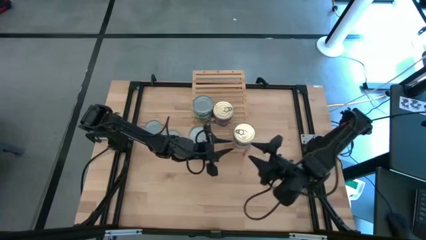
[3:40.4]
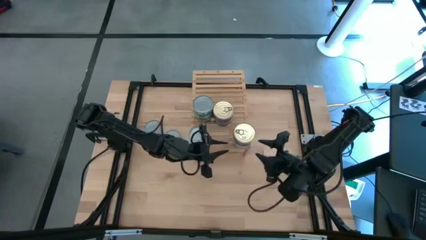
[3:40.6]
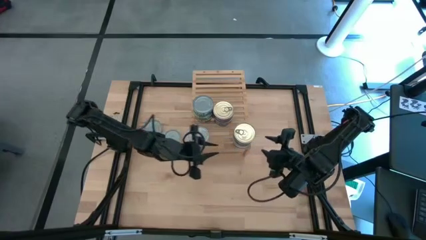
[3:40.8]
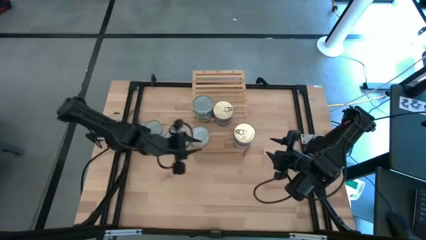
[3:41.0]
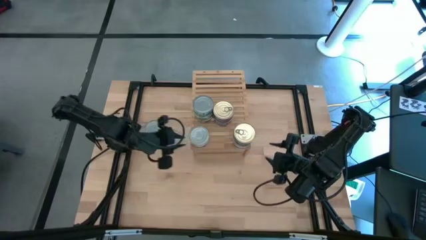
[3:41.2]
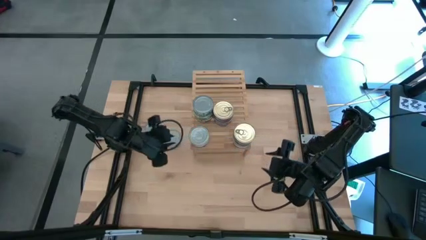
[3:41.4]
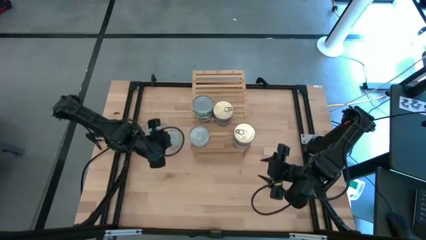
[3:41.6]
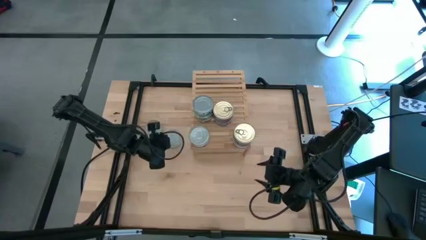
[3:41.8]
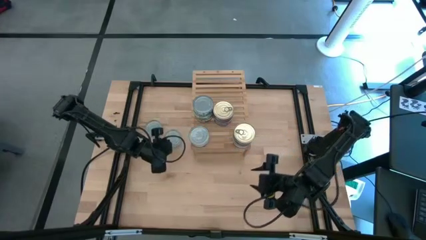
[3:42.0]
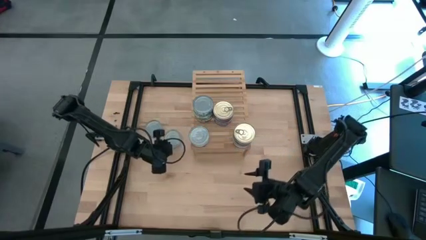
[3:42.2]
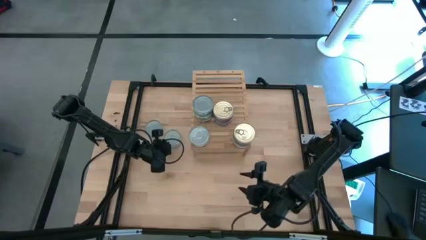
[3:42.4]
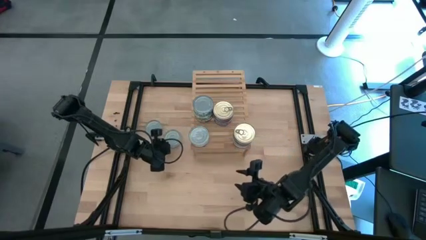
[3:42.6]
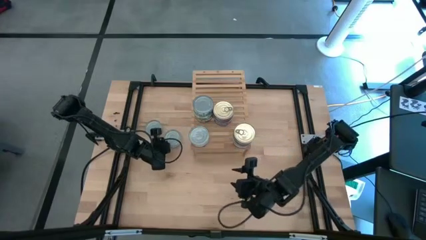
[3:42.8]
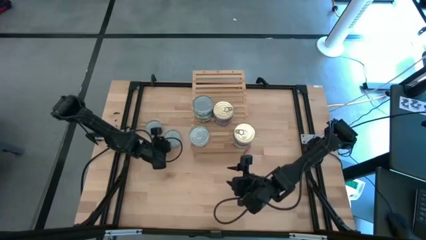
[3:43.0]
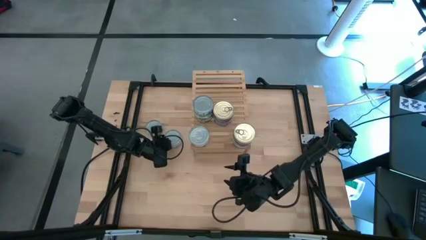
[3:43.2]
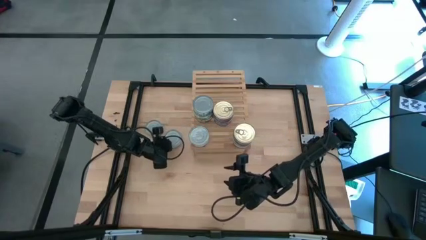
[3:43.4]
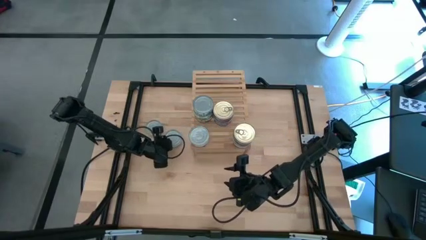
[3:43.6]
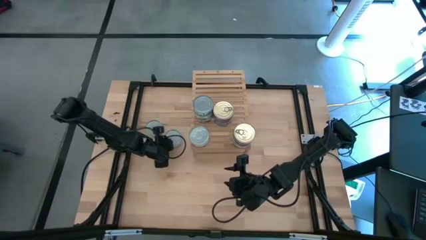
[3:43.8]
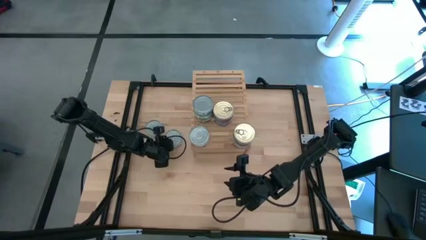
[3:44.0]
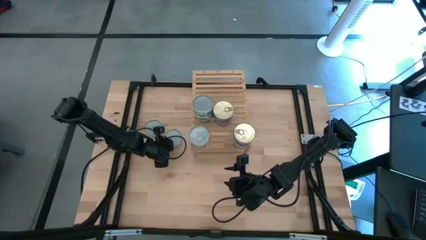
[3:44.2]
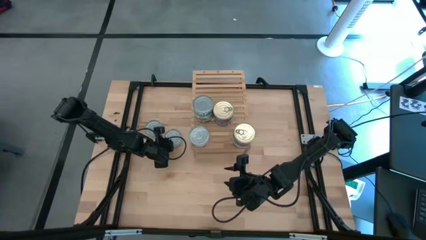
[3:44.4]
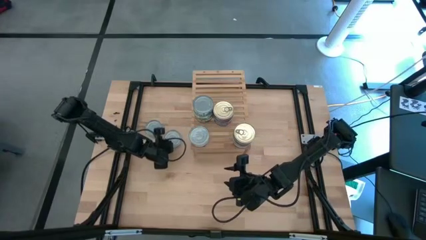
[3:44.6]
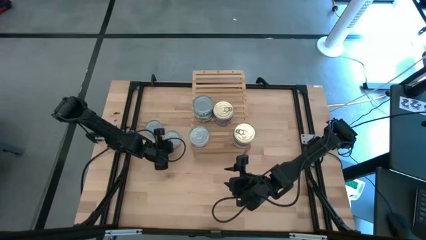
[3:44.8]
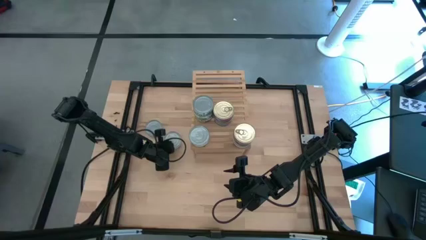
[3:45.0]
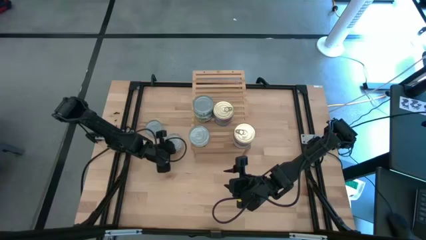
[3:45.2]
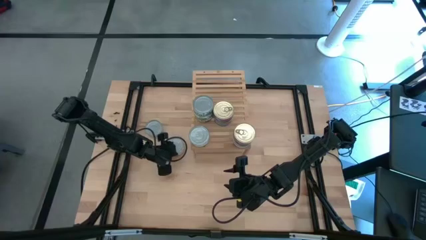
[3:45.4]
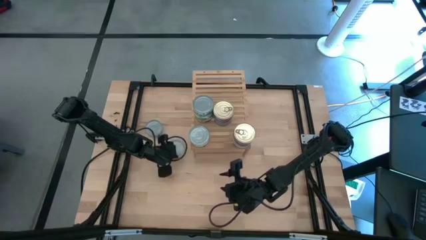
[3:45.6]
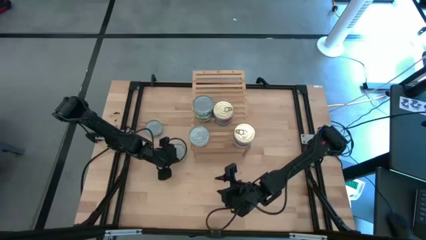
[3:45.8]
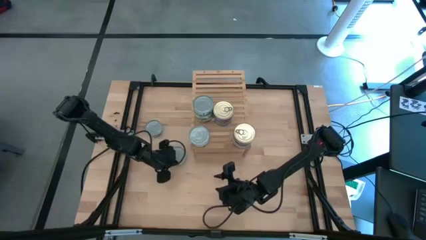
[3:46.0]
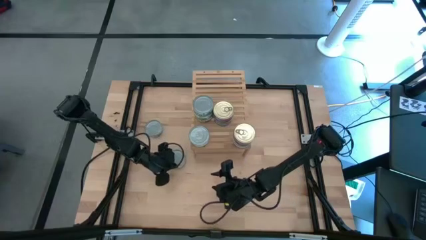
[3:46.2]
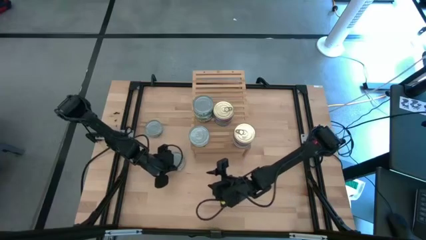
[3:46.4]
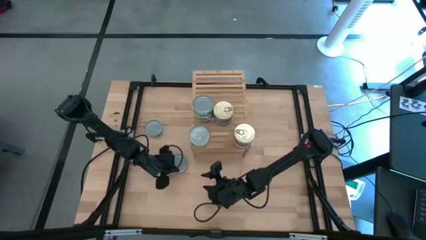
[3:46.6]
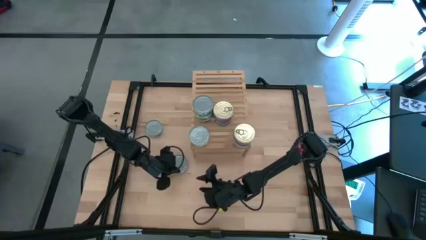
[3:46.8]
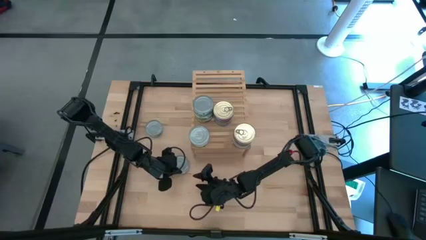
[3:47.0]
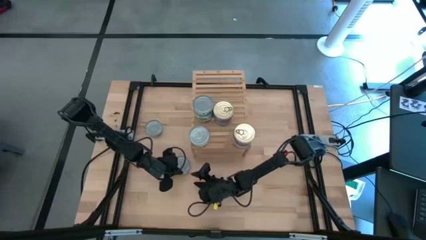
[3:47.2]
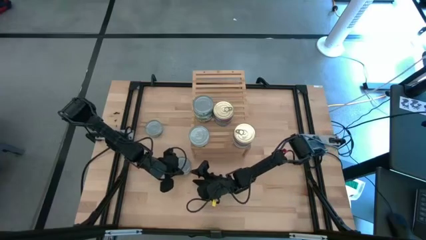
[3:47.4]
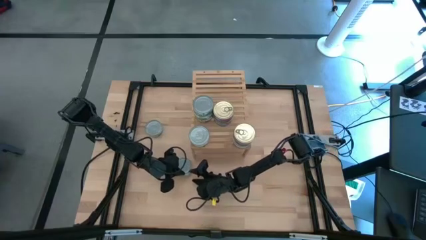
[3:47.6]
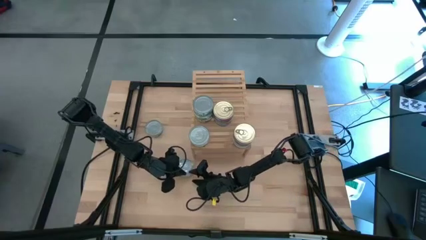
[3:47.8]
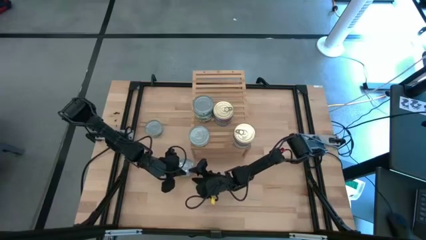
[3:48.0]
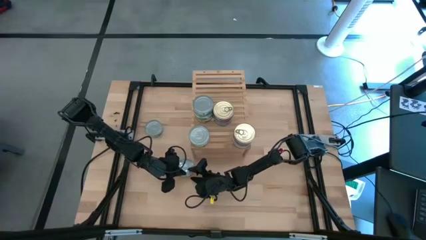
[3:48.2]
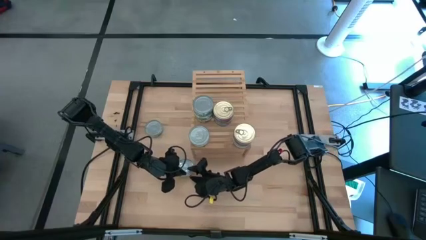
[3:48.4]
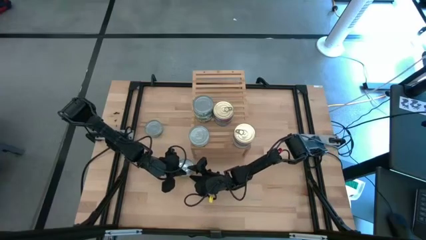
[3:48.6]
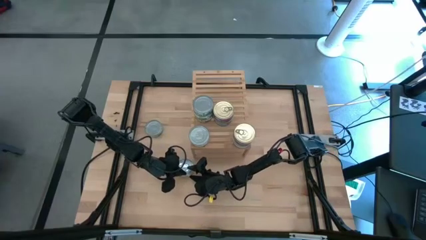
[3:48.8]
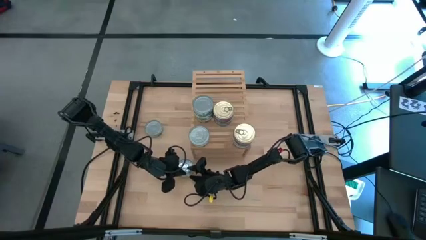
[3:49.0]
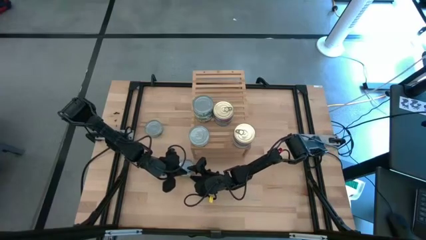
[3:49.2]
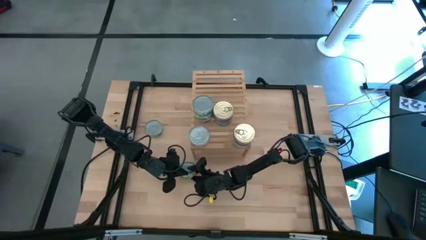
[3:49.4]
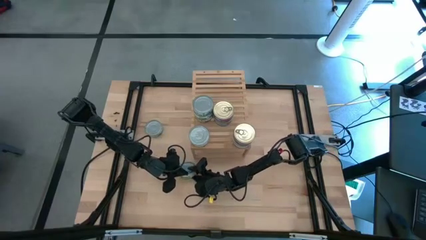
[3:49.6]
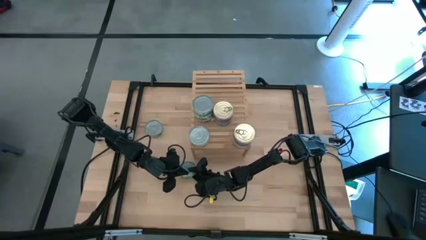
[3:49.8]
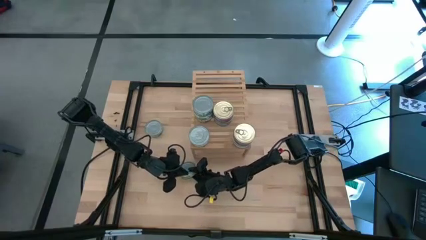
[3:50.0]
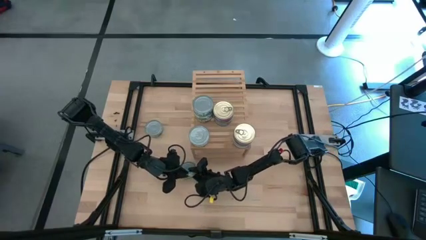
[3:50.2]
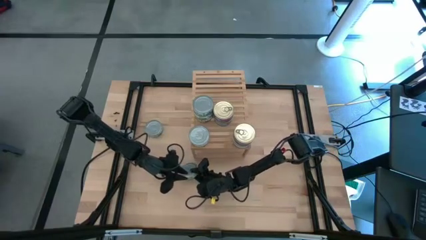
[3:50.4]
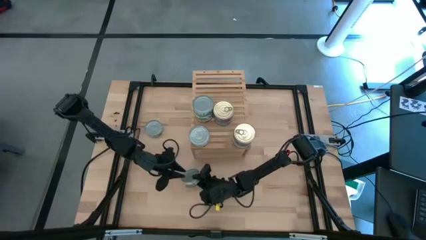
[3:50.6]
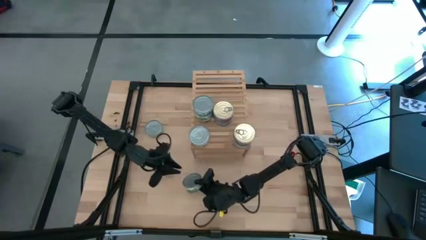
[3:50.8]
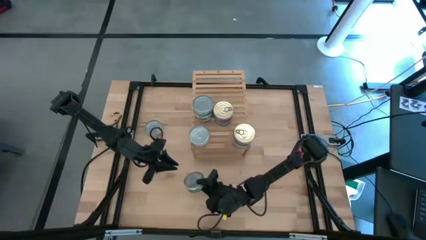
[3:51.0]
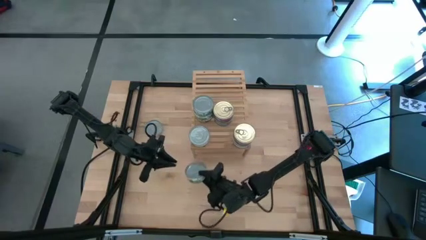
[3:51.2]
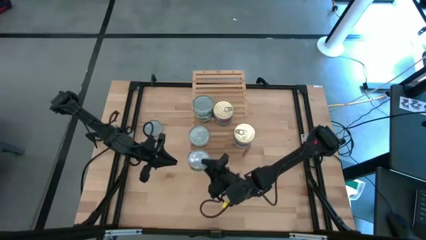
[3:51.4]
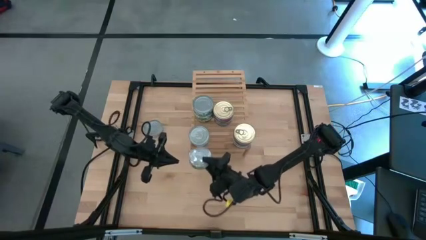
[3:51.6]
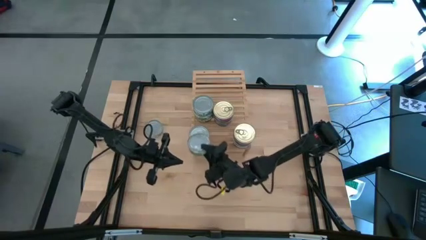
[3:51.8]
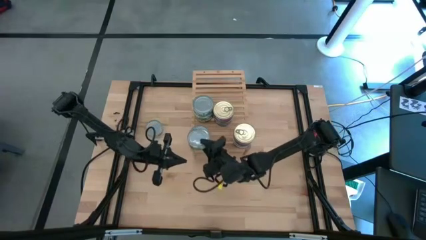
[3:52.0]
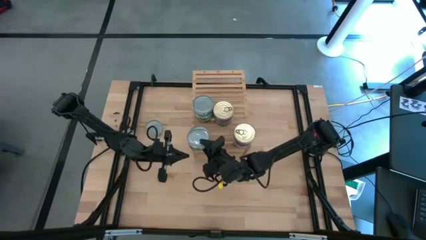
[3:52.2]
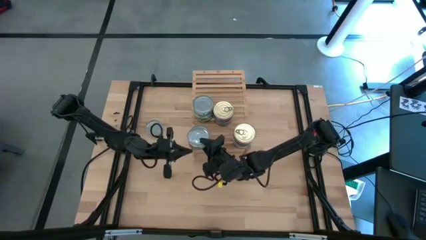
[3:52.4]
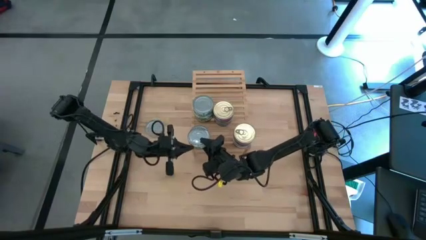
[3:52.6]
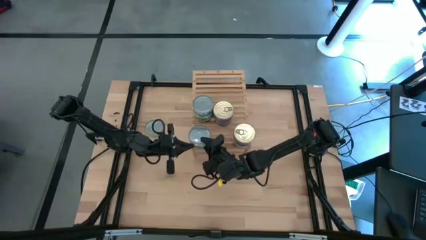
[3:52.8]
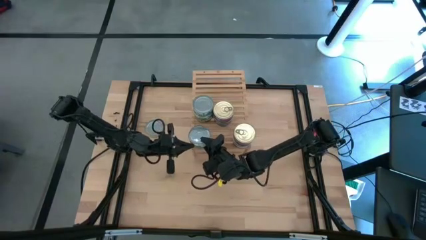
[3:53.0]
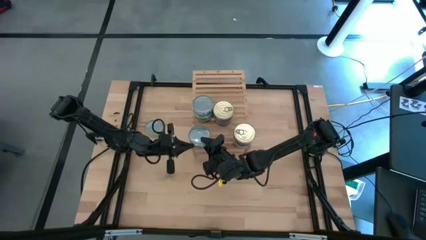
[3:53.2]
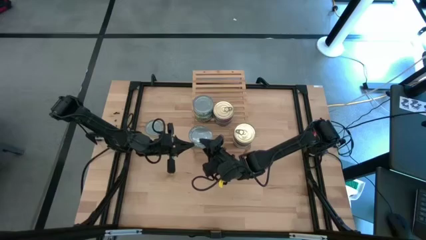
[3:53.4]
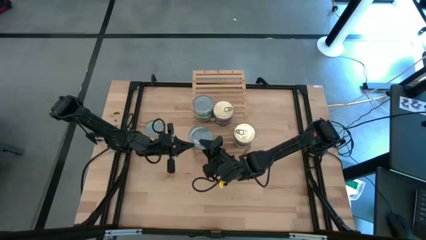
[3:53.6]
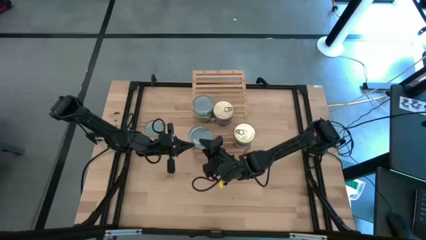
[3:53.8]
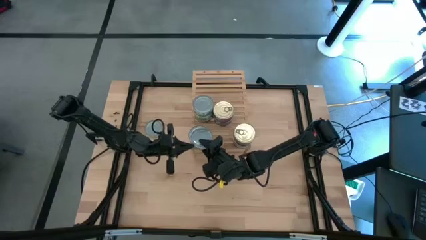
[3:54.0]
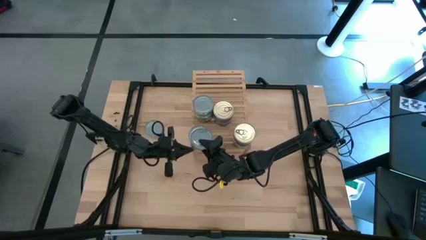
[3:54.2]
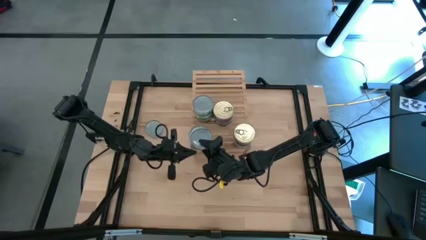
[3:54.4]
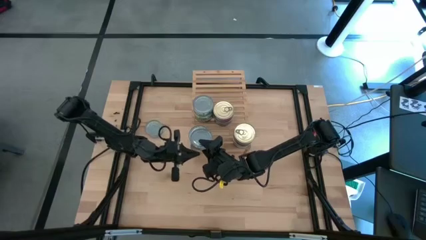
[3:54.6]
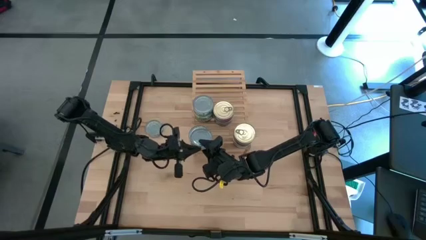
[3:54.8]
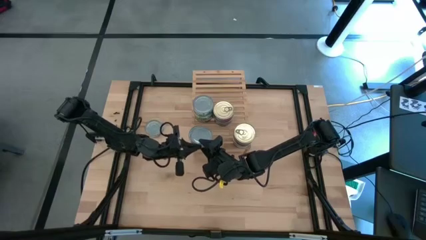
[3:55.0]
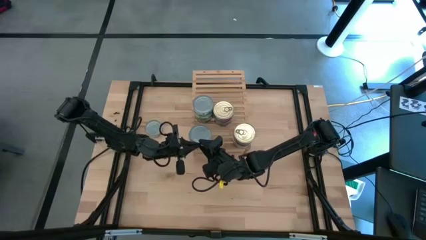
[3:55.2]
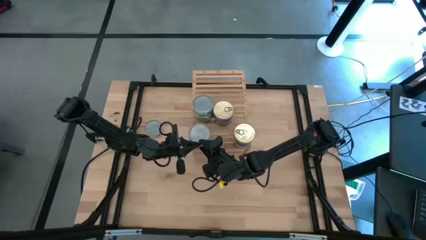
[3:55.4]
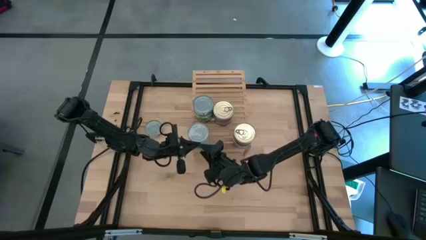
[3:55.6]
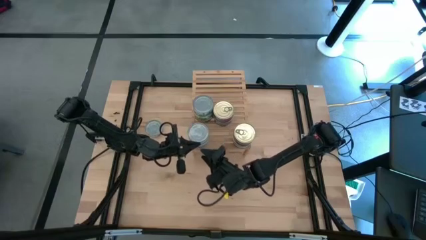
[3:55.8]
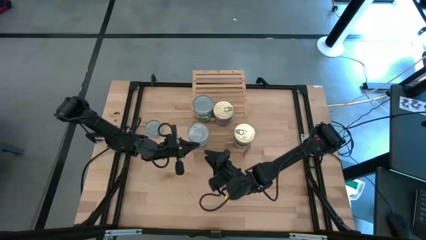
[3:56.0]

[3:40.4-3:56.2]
Task: Stack canned seafood by type on shelf
Stack the green tuna can on top of the green tuna can on the shelf

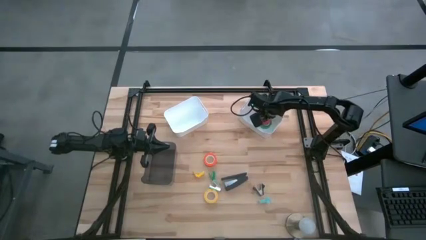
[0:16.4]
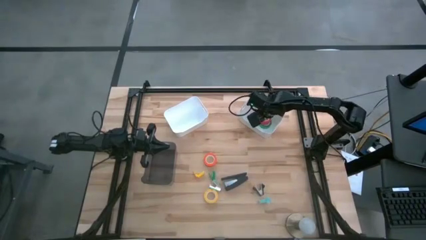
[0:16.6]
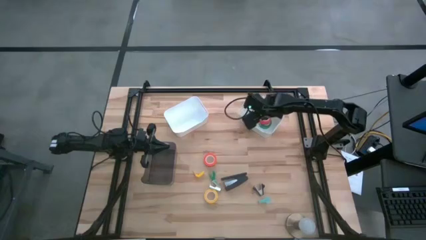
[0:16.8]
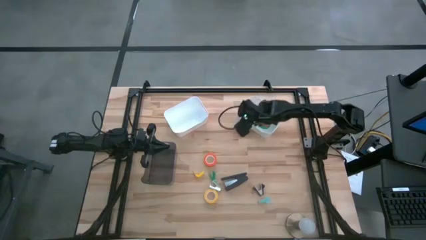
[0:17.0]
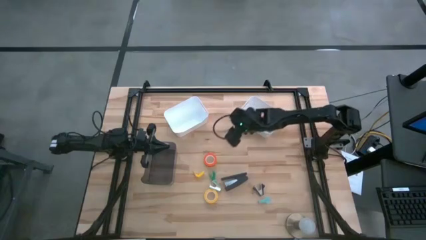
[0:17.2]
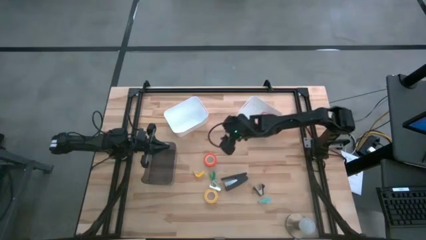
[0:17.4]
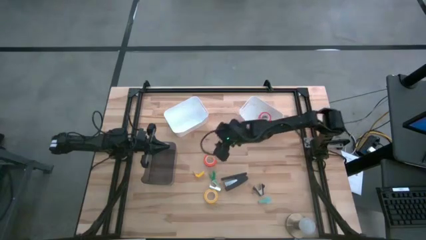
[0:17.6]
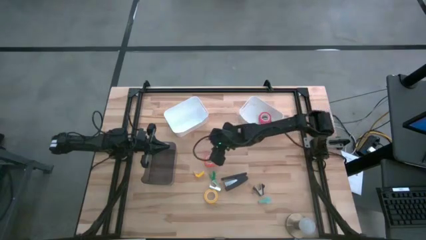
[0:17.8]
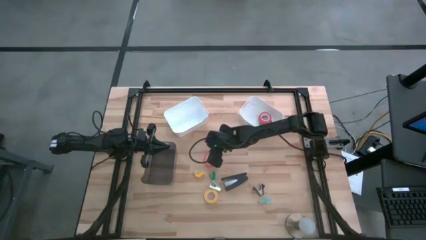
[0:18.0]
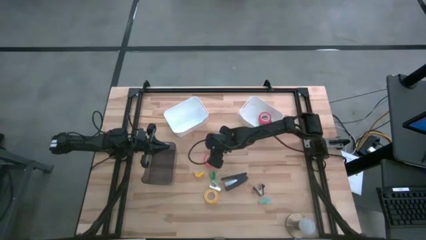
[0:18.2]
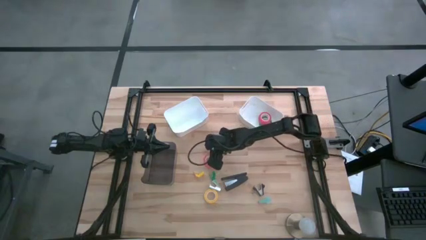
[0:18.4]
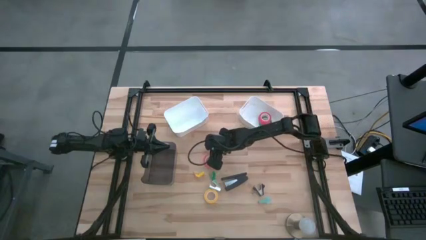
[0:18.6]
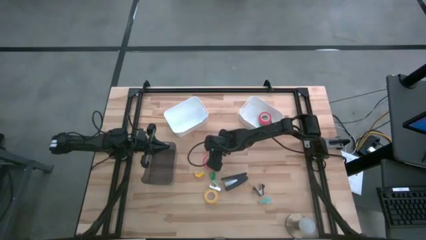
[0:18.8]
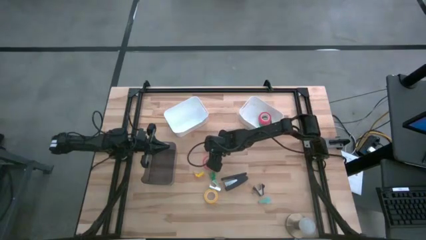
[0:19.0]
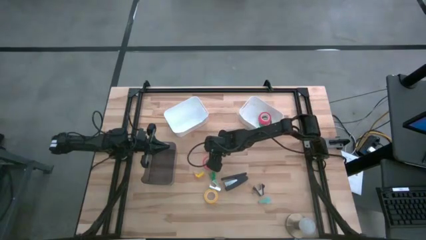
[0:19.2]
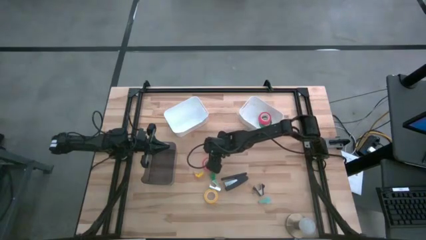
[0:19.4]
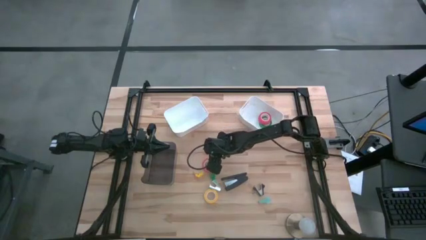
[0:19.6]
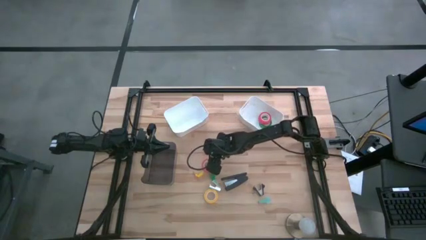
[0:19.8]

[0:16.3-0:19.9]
Task: Pick and place Stapler, Stapler remover, tape
Put the orange tape into the right white bin
